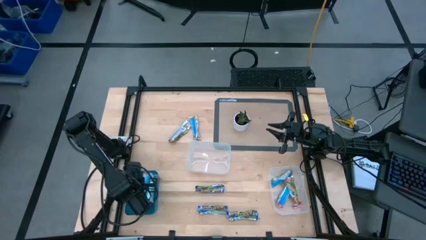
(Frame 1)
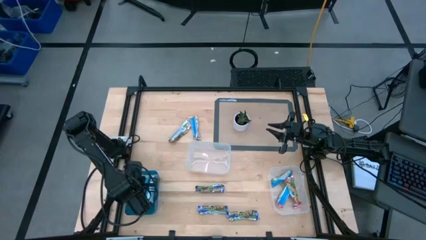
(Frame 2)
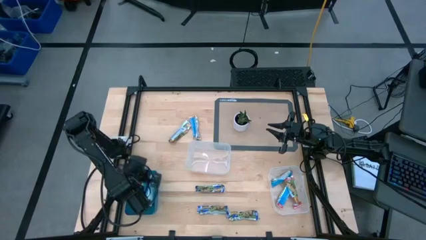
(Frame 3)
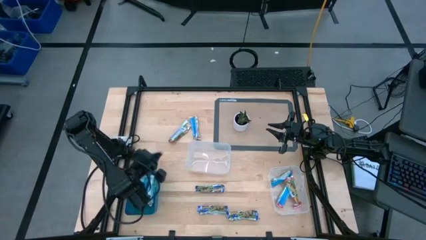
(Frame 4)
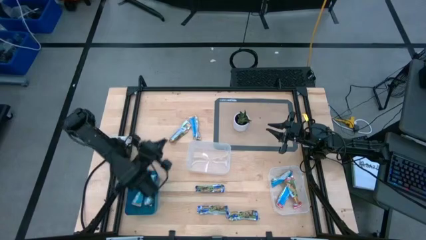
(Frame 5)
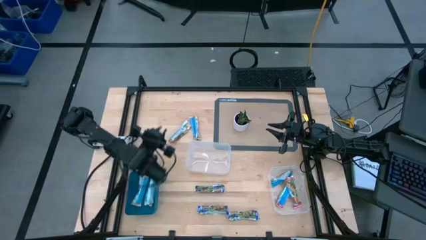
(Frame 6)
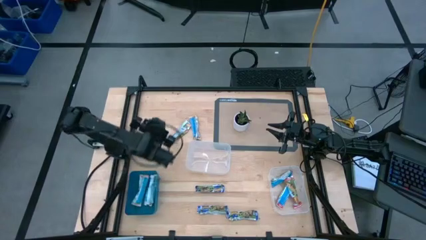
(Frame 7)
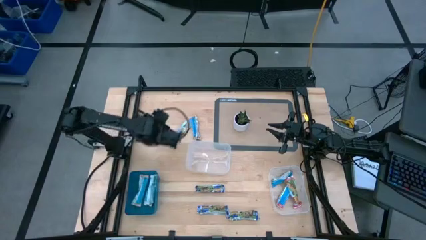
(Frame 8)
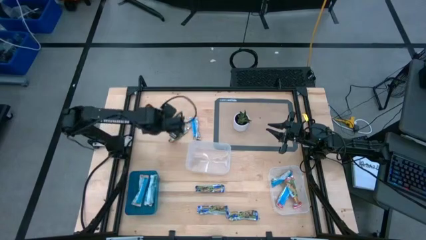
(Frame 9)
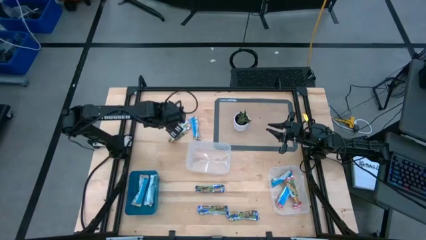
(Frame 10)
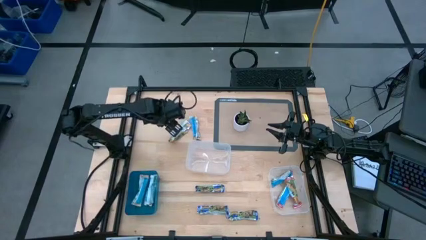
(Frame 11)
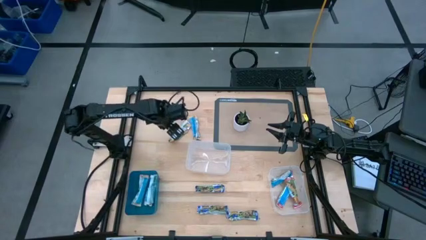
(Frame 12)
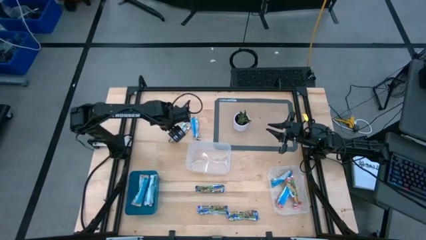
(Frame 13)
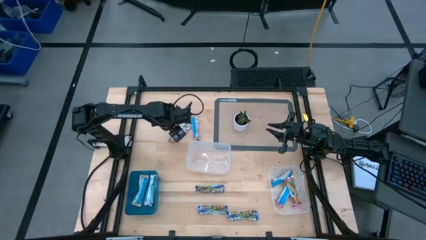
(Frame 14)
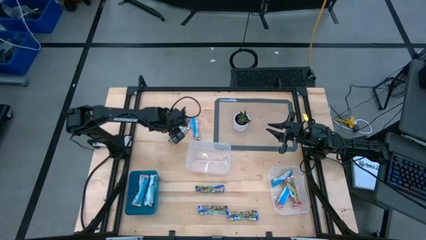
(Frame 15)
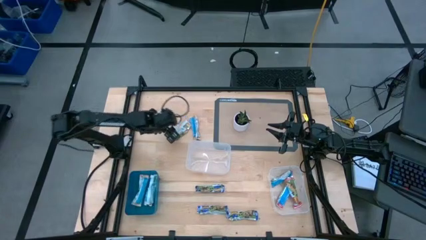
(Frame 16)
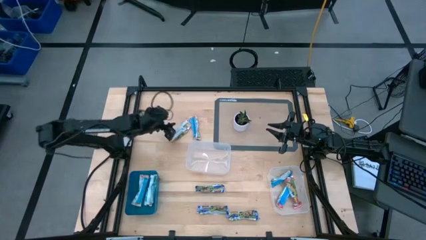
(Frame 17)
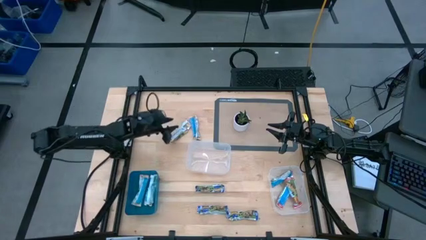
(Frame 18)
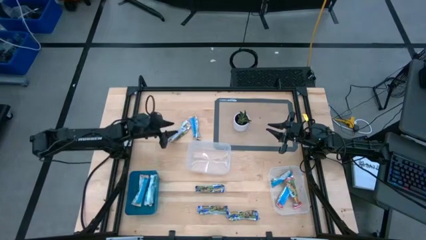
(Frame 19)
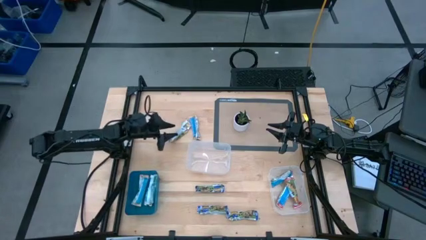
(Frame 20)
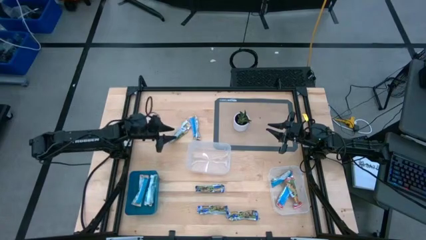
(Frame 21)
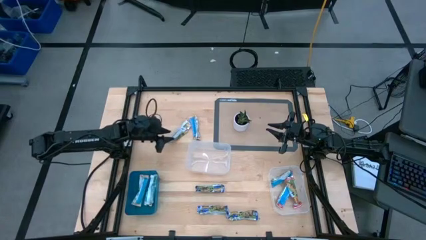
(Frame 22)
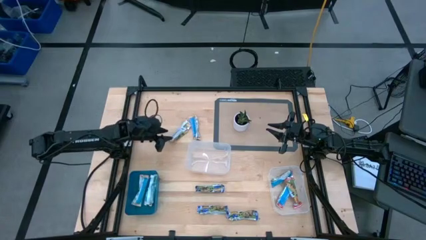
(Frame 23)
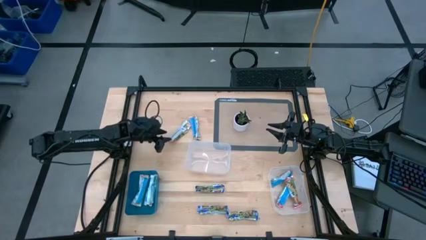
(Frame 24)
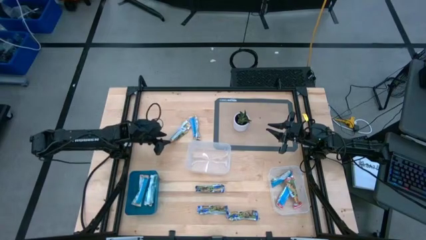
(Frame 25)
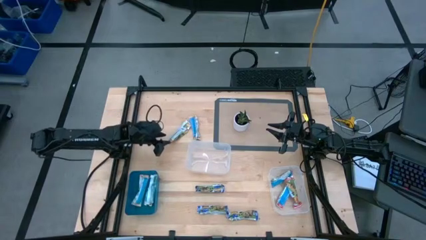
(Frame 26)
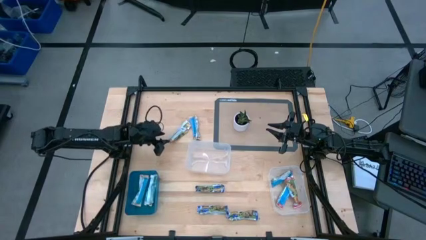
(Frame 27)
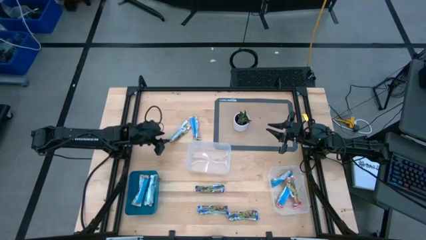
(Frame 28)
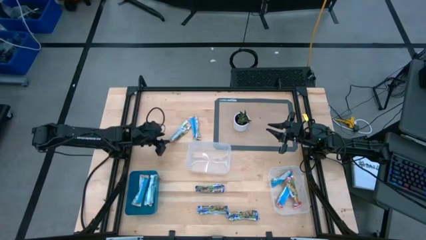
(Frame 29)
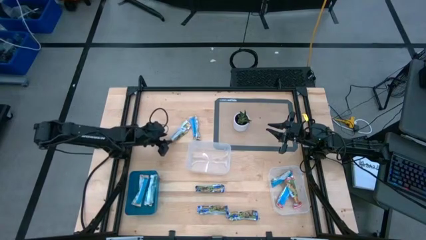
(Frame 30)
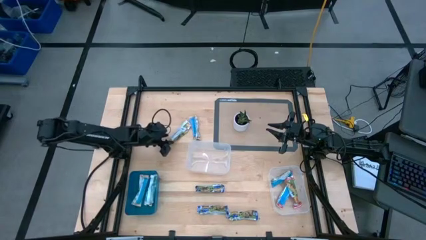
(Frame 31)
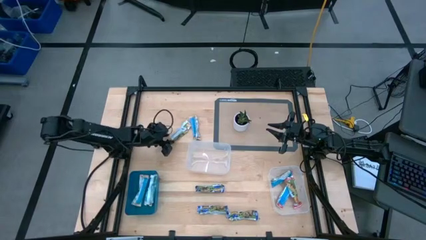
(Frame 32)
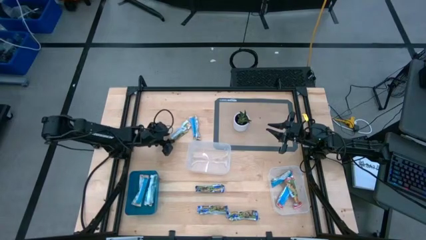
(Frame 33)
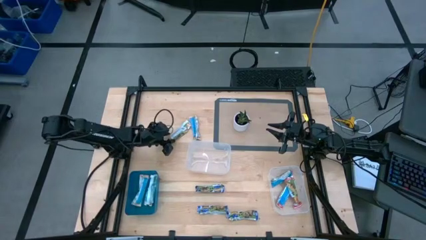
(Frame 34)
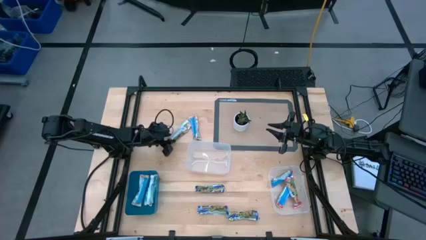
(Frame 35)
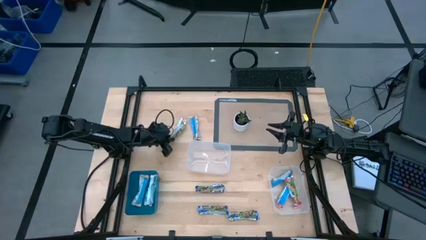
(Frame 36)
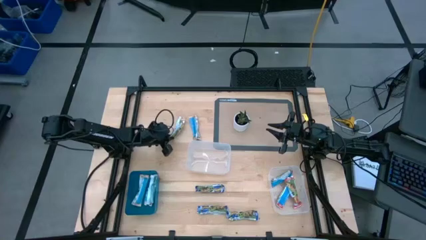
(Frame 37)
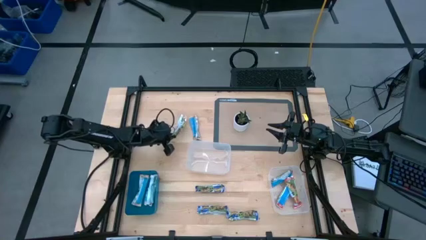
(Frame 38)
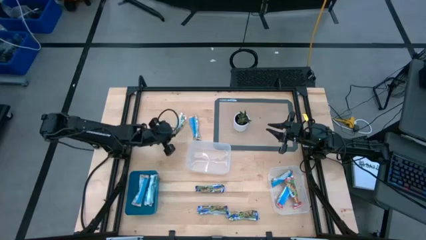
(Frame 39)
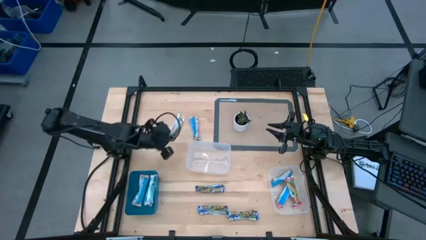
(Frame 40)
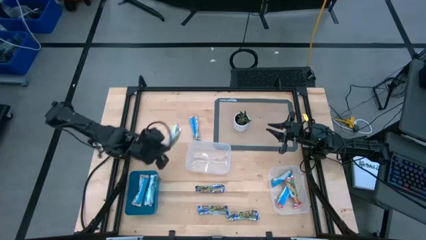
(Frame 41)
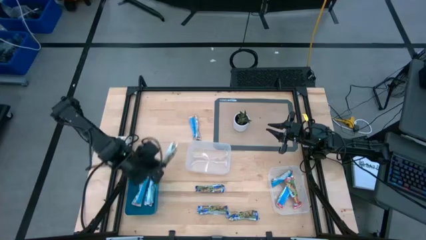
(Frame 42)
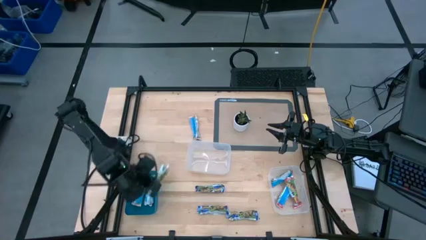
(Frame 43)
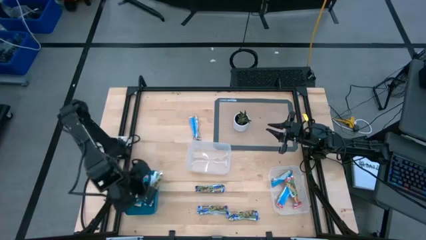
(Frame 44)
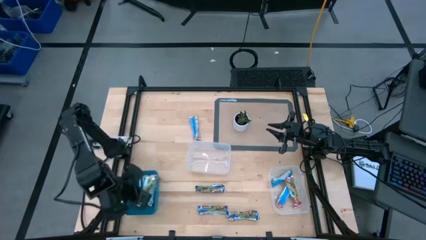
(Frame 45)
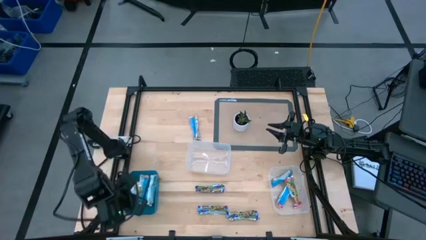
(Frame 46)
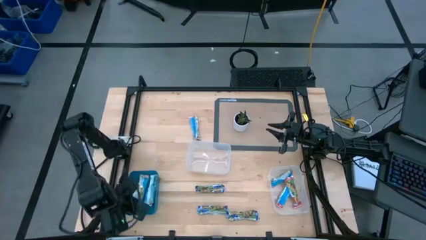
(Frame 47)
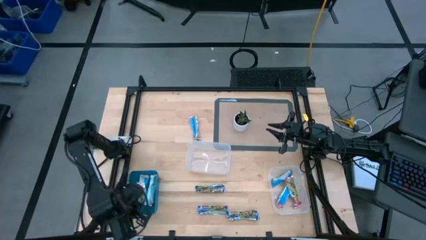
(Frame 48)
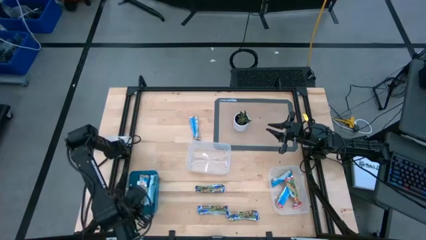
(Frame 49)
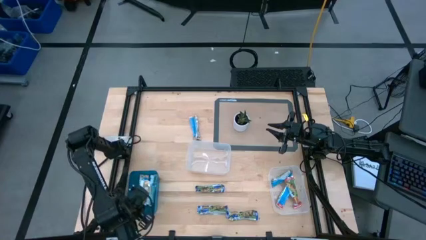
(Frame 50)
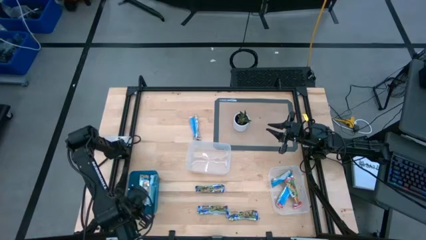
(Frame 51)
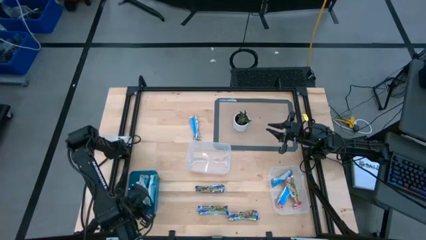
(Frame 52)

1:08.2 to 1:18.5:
Task: Pick and place Granola Bars by type
Put the orange granola bar into the blue bin

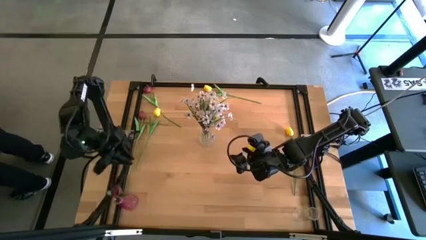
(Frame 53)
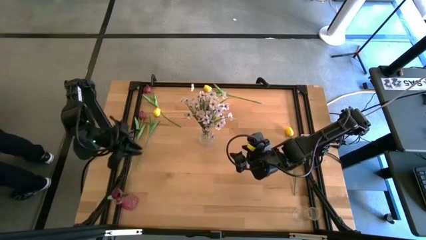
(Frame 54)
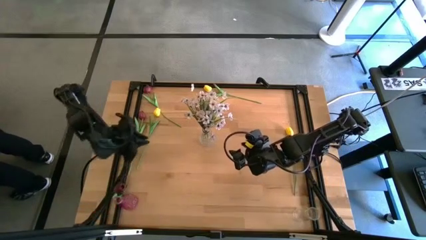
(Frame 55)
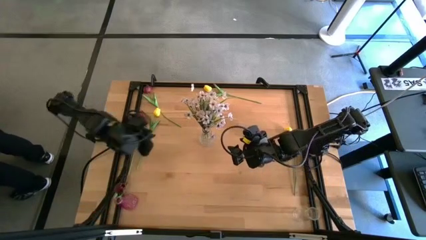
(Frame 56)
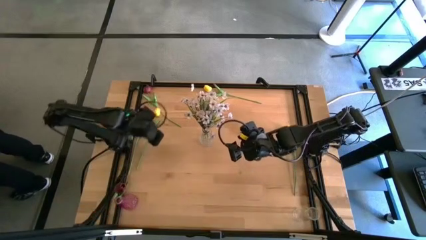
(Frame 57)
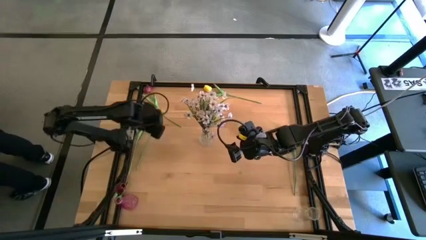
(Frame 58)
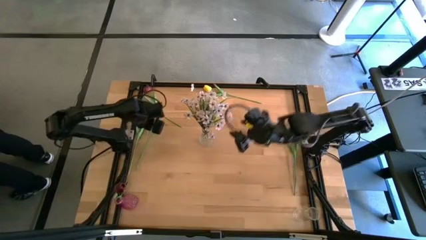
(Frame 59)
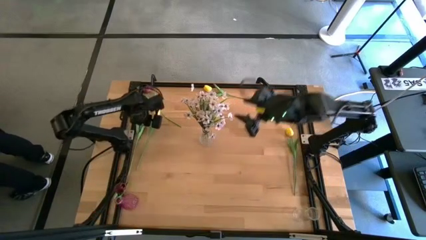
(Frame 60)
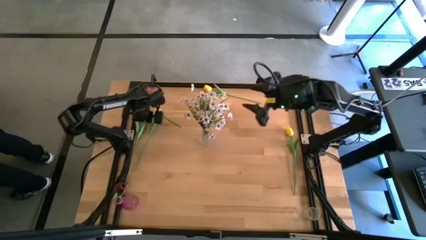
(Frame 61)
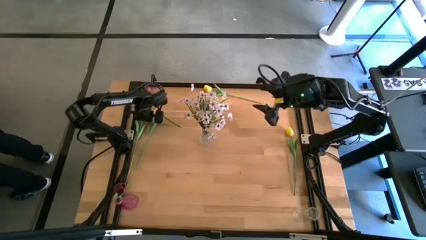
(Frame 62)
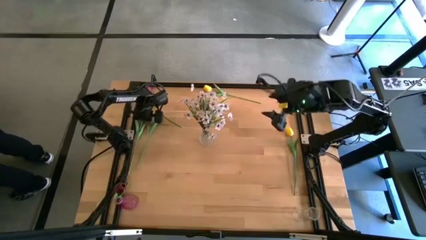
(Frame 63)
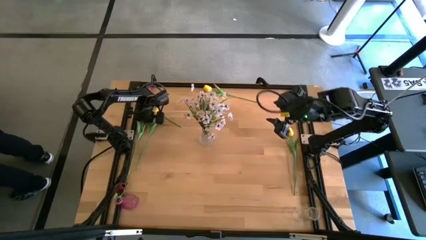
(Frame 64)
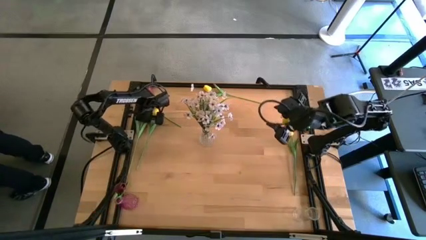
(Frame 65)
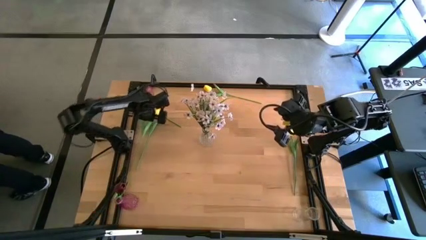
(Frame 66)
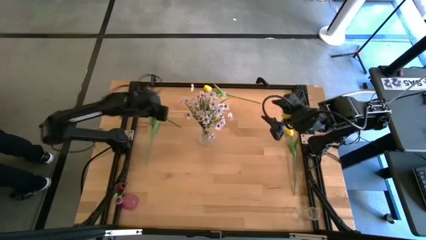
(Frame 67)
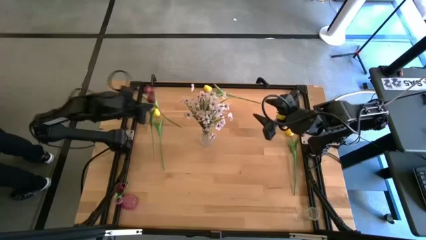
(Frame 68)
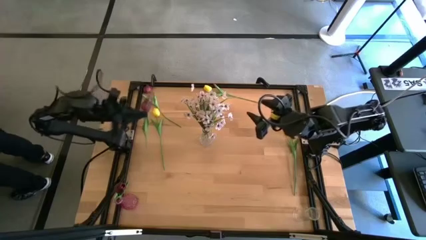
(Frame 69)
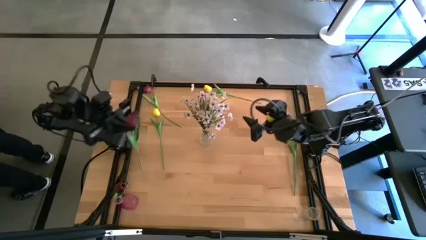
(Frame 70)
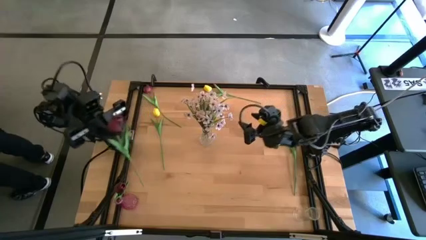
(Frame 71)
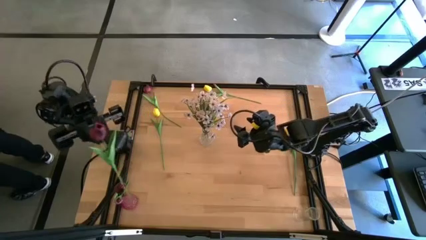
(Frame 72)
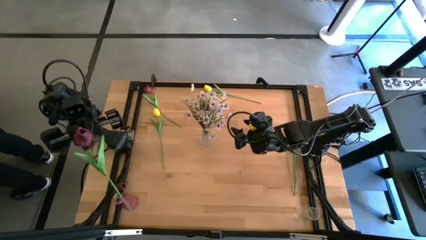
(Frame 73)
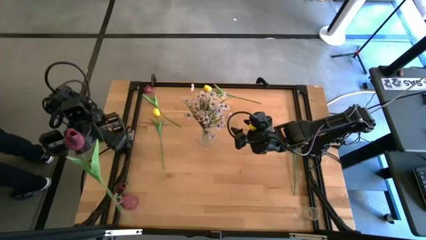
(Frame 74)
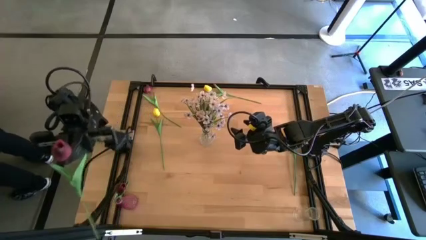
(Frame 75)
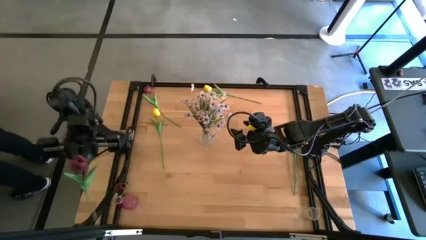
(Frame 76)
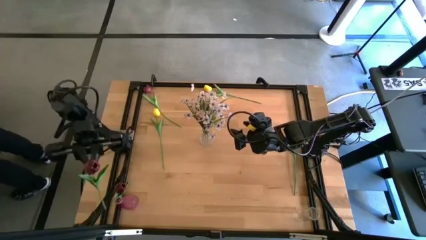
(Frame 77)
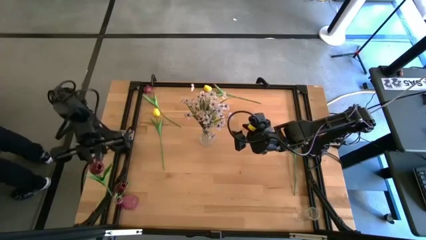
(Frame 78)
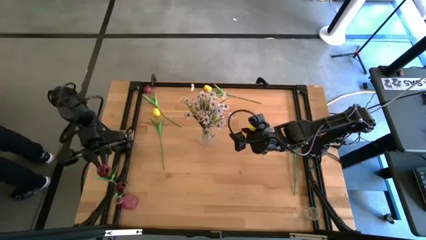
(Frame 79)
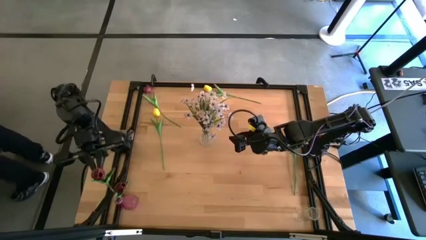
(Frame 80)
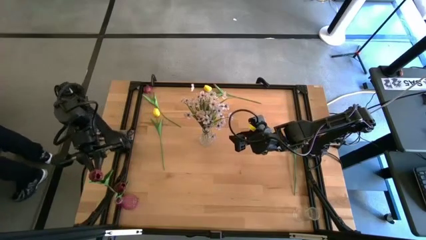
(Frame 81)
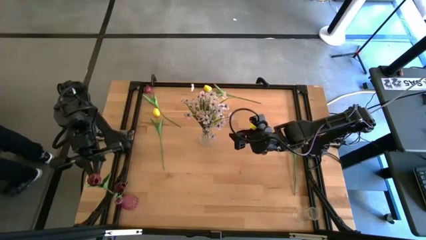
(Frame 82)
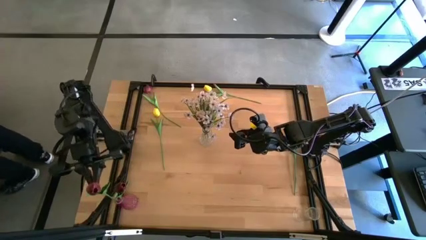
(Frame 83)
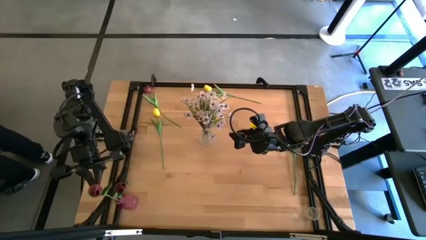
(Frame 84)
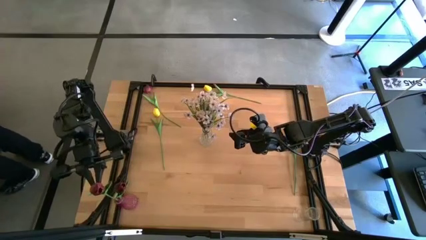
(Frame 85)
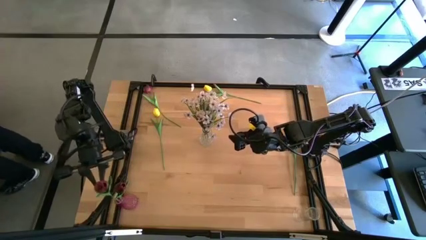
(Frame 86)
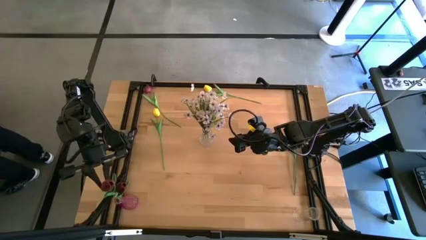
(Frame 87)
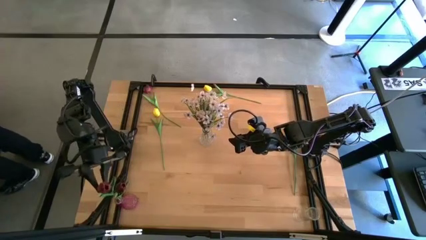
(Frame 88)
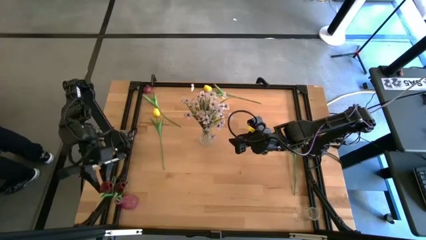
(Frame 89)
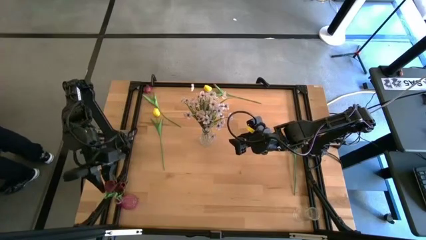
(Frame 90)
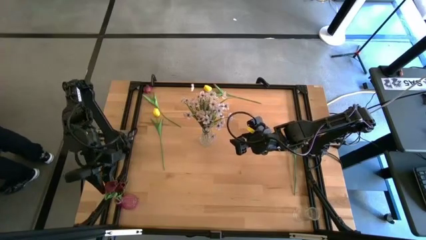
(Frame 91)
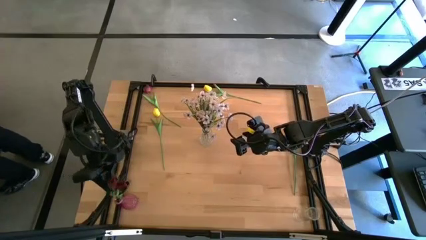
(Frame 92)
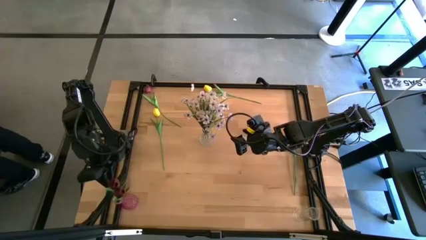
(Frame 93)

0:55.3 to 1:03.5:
Task: Sort flowers into vase by color
Put the left red tulip into the pink transparent vase
